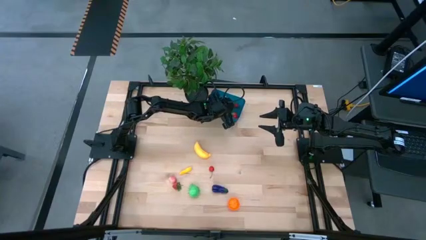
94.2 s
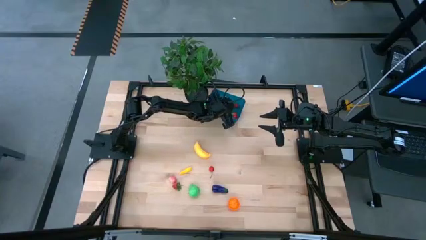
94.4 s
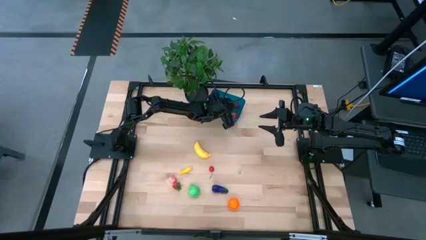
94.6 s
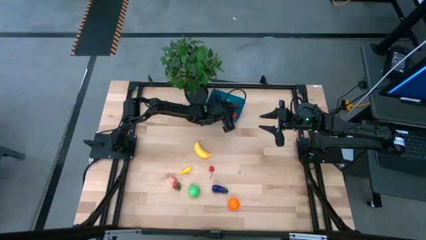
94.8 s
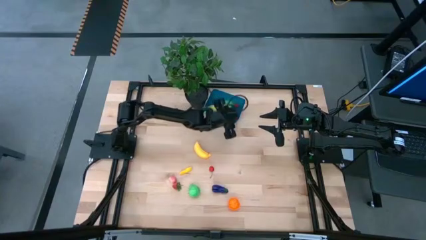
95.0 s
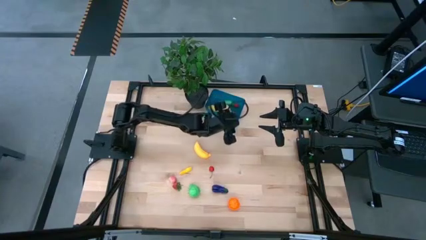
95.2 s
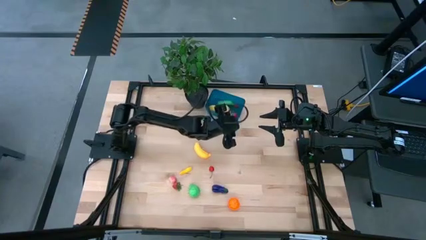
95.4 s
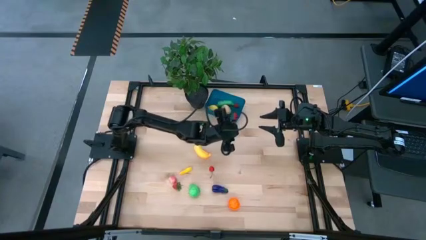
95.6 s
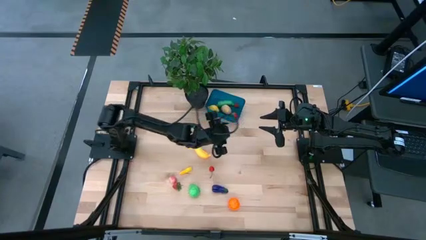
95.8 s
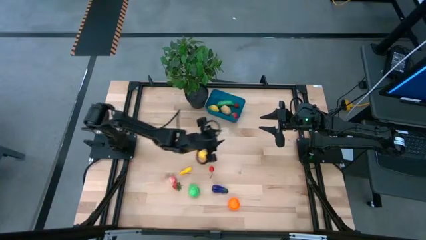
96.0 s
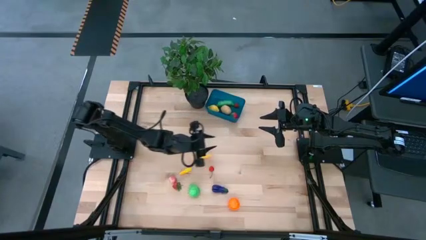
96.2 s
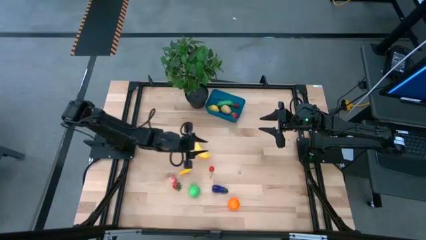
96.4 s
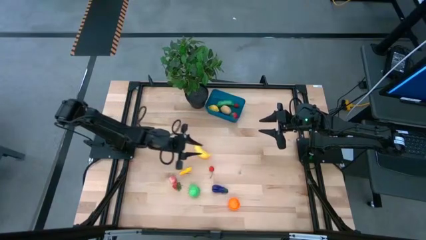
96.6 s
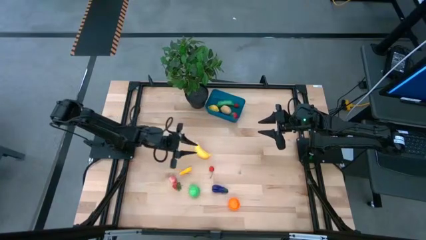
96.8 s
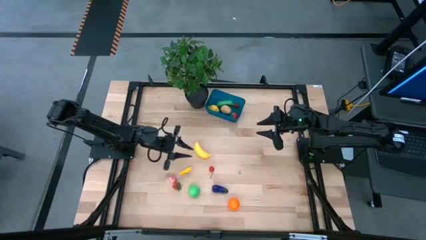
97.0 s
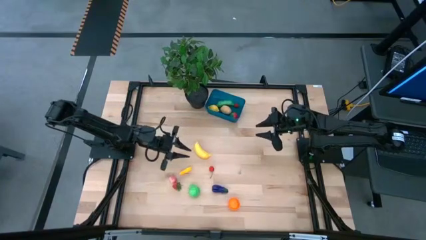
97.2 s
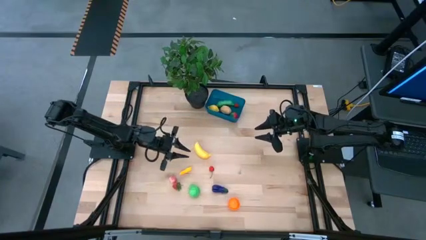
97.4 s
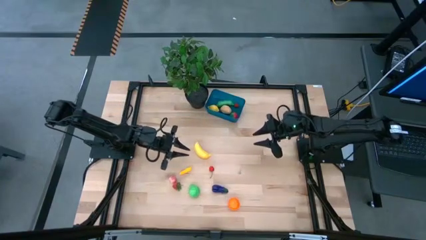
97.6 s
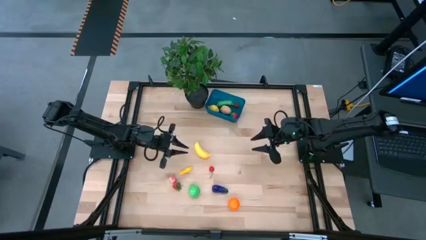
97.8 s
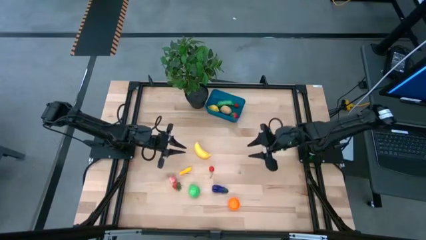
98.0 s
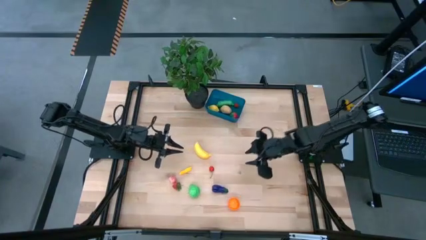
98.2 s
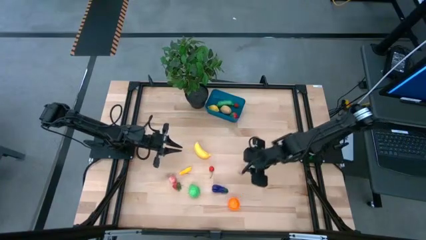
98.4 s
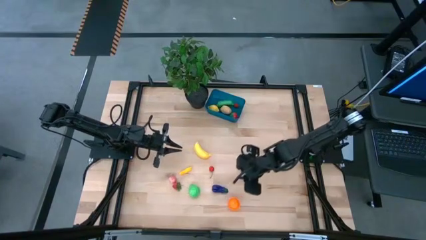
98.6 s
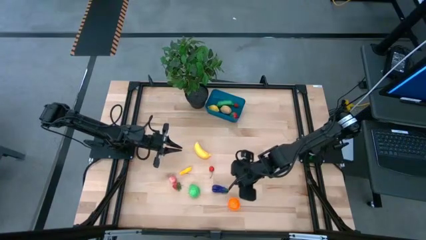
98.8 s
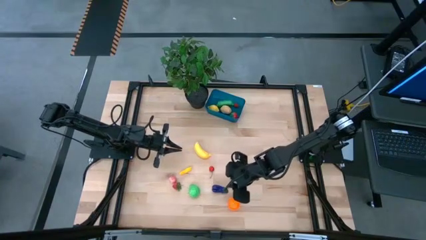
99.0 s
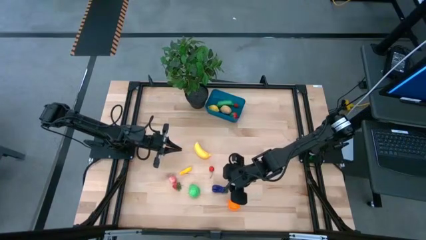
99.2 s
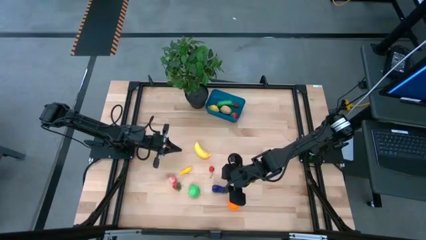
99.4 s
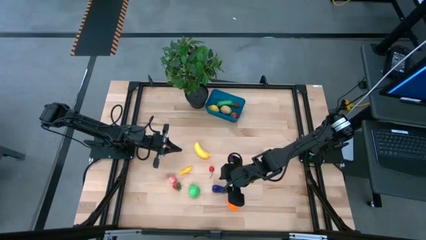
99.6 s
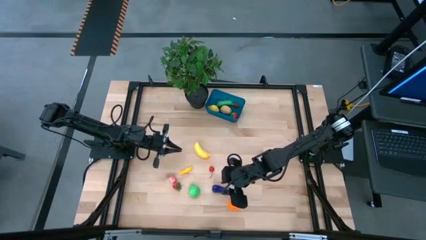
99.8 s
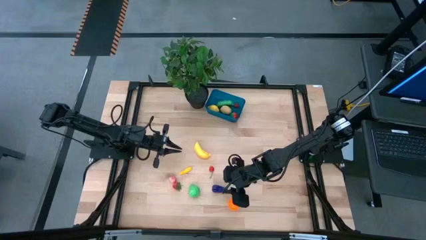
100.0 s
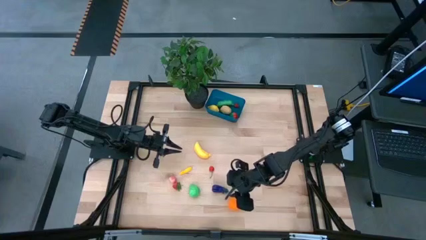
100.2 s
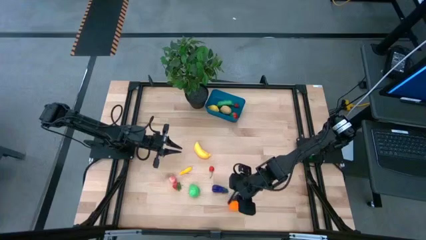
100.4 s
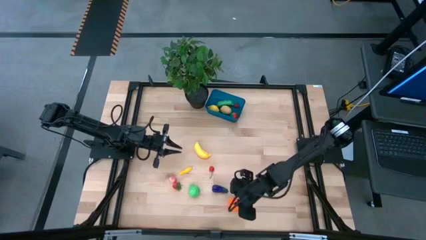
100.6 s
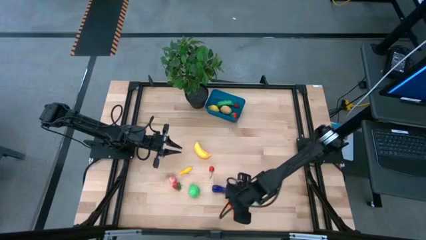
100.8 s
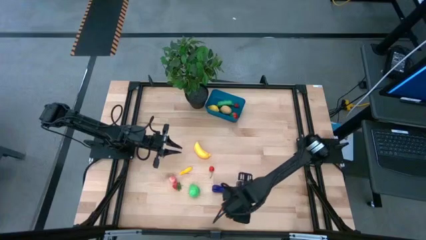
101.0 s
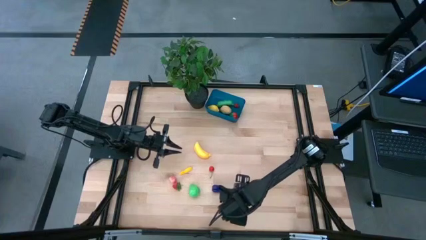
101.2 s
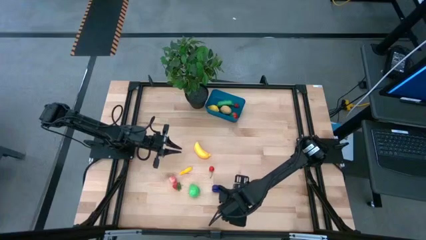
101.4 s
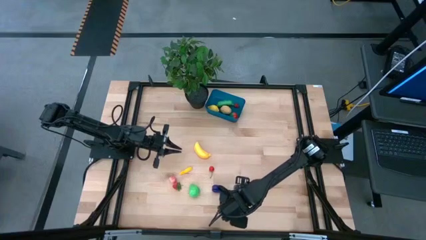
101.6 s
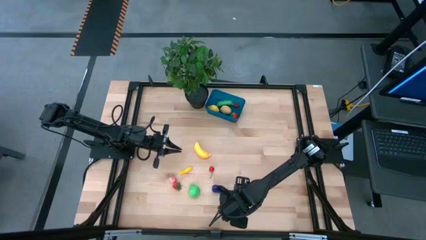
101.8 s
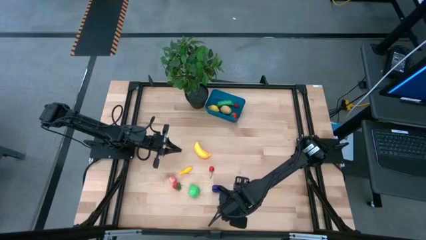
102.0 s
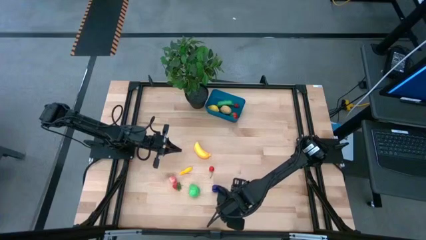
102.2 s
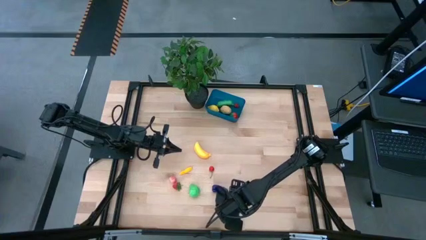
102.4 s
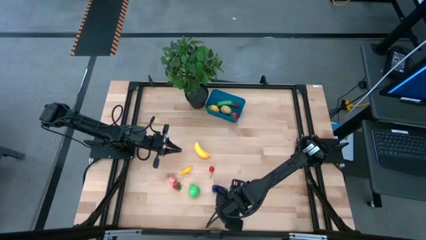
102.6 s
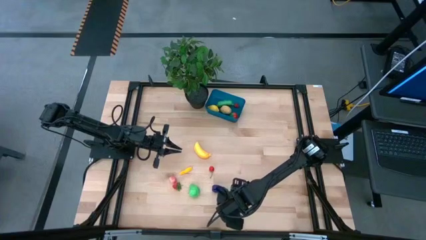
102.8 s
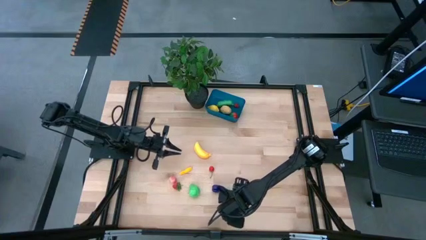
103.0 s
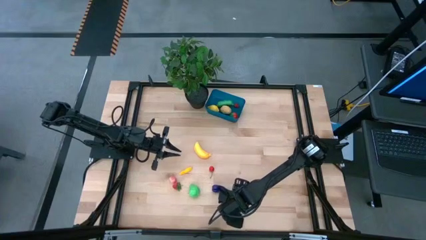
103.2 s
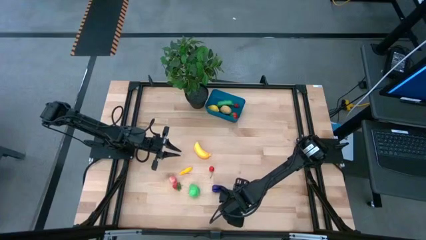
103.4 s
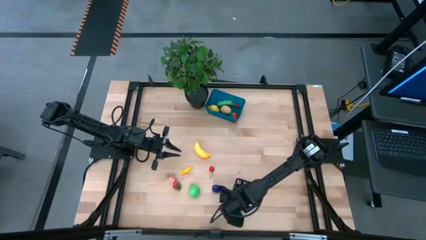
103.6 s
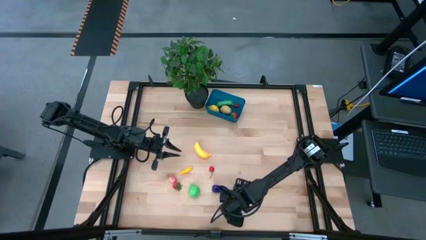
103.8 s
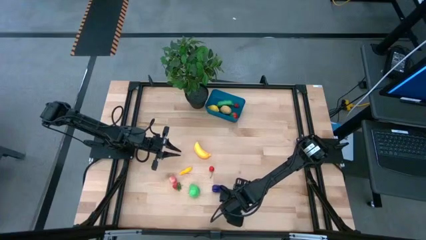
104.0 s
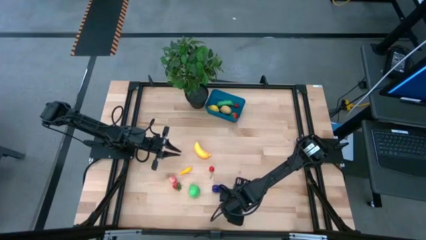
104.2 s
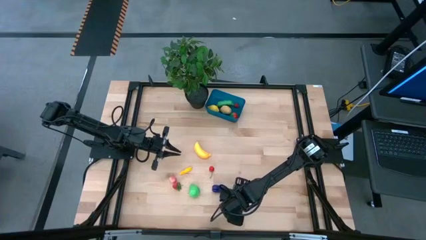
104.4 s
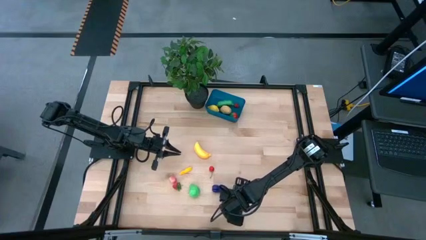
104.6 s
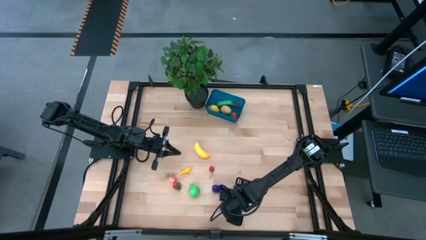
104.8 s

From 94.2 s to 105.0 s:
Task: Pick and placing Produce into tupperware
Put the orange pumpkin into the blue container
